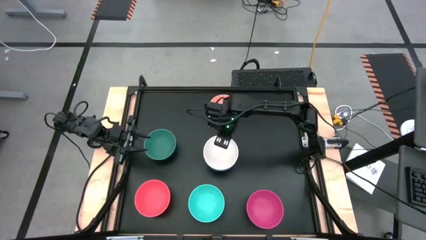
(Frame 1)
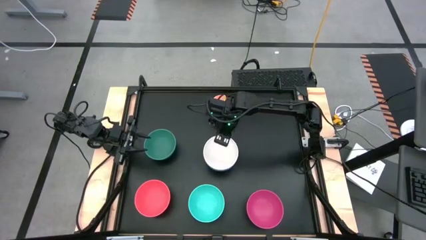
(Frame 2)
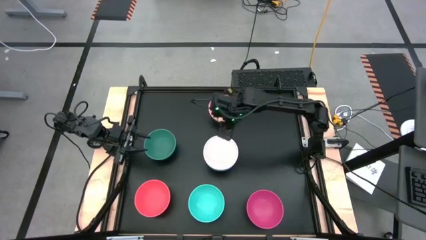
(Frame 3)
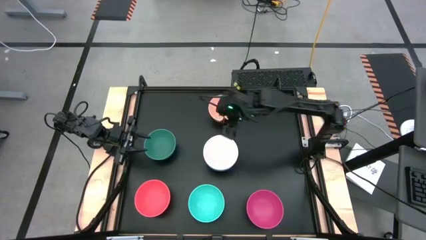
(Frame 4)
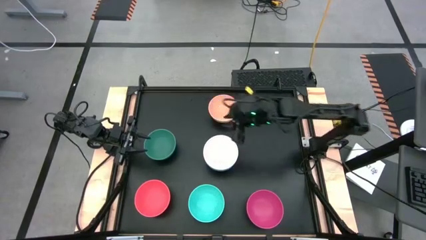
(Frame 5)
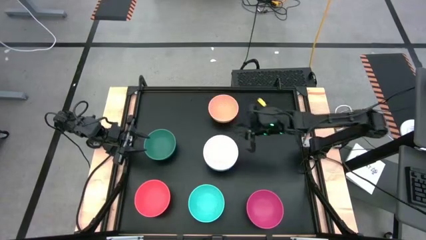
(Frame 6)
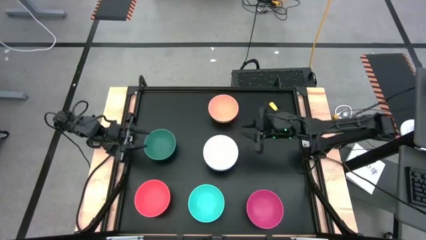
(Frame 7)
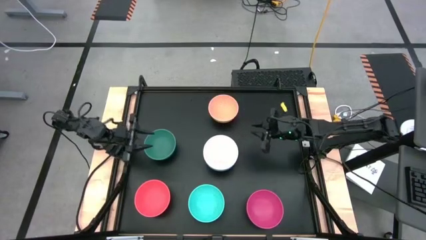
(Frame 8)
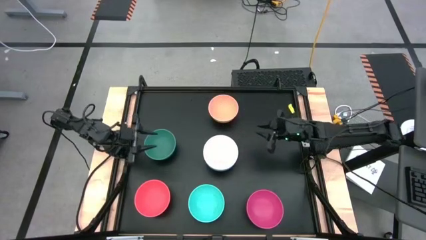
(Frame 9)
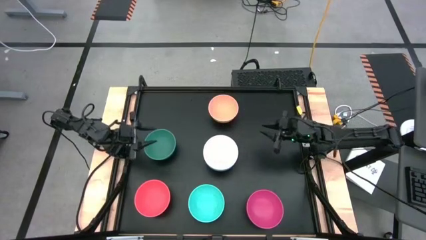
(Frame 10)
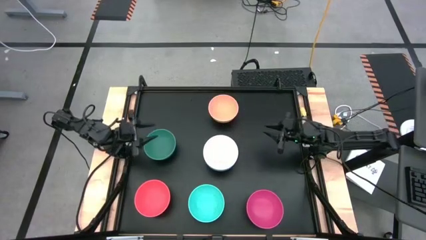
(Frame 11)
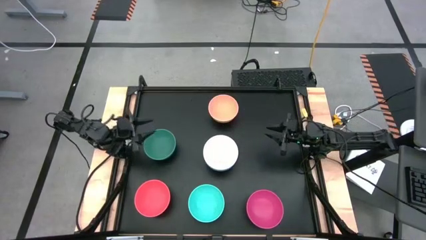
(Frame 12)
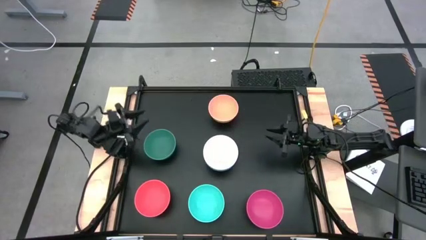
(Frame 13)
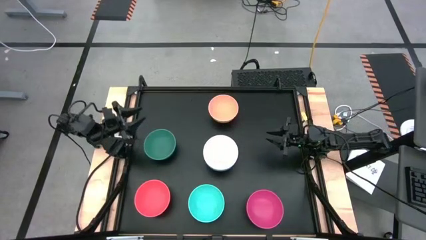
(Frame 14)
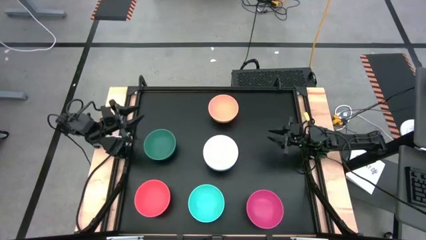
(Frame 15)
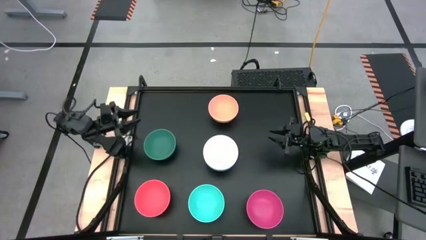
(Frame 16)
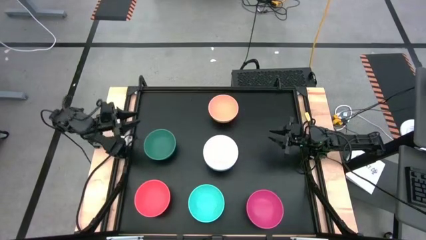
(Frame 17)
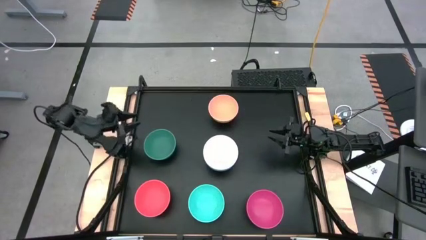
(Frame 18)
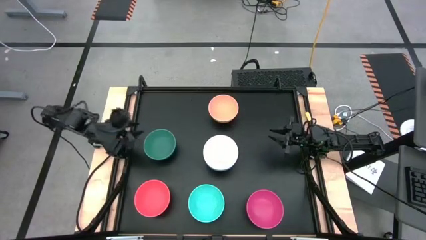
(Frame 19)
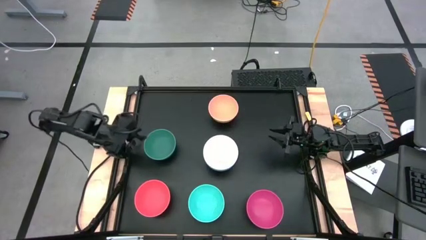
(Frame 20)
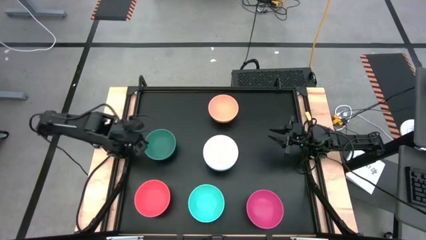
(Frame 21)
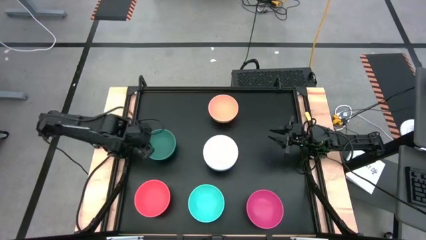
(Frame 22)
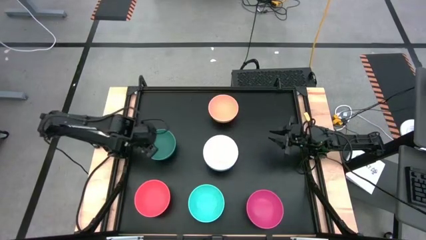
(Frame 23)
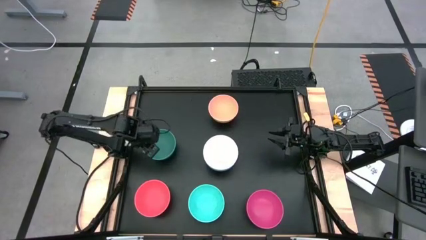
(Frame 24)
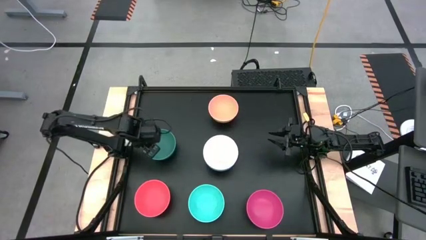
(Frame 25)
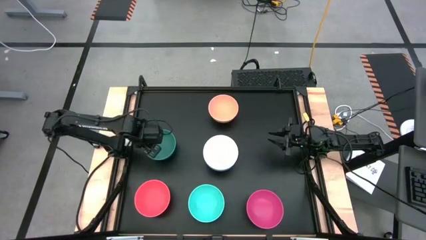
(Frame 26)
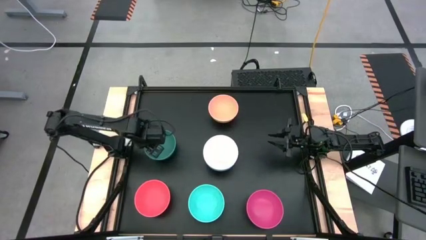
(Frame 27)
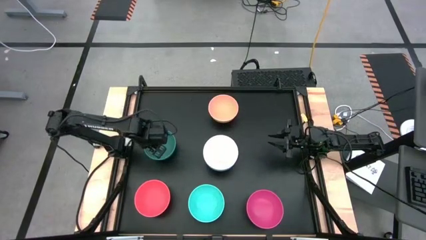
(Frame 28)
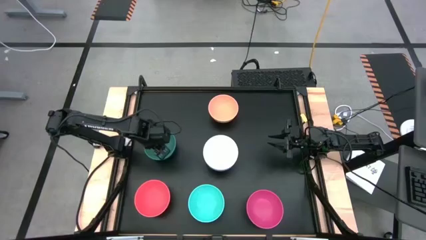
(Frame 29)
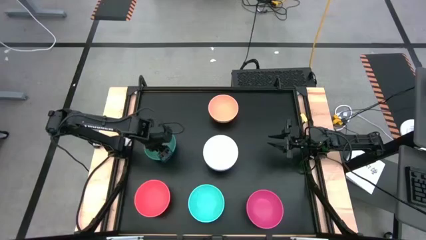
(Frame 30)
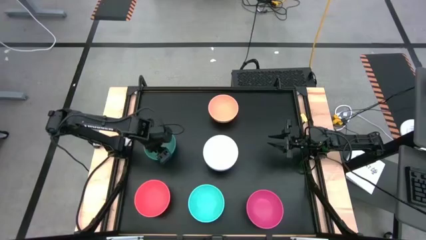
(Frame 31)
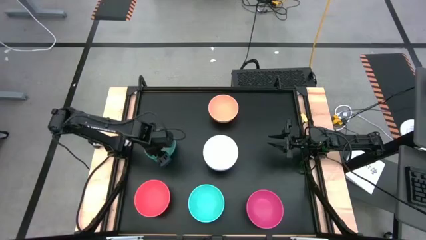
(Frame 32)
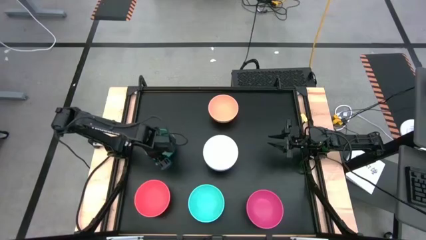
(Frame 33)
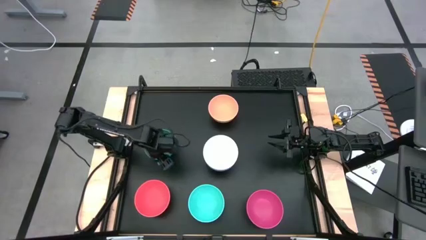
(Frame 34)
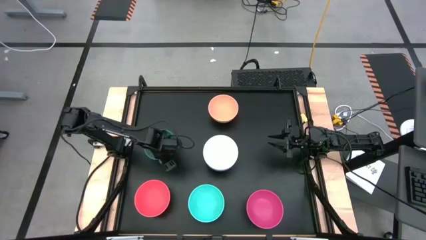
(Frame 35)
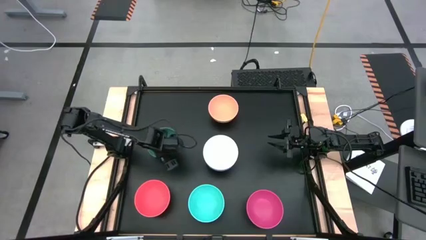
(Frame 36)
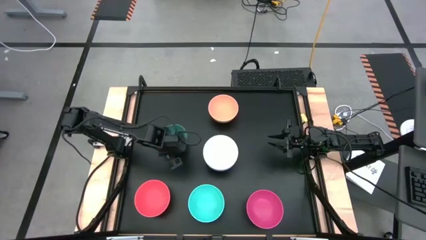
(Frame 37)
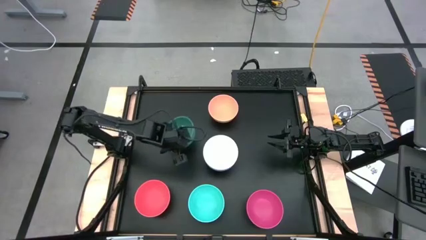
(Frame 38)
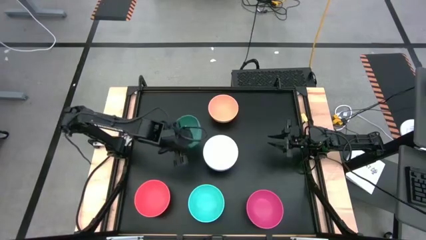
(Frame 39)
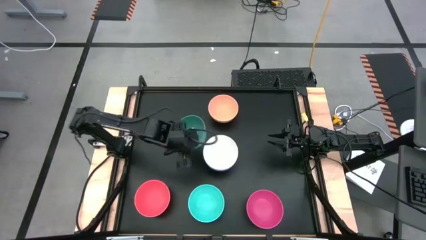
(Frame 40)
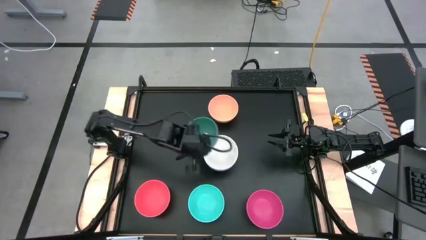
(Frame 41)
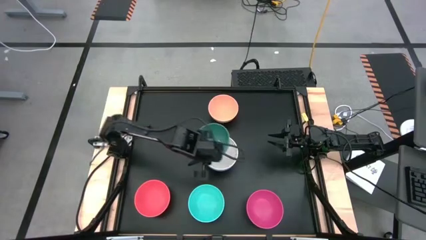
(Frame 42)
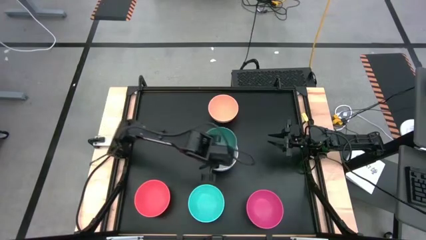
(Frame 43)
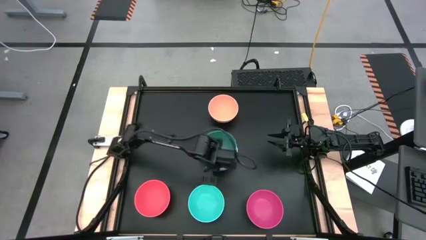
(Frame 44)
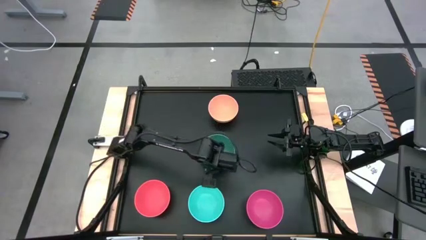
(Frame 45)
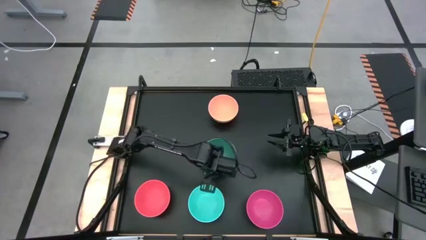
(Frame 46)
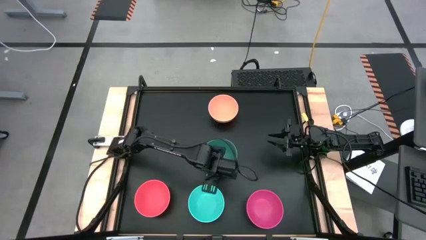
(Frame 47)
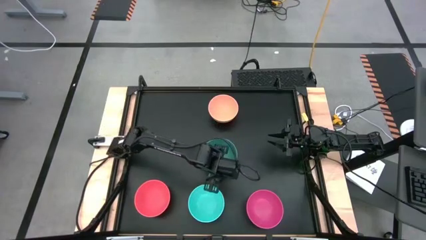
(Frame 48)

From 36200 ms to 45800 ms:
Task: Nest bowls inside each other
Stack the green bowl on the white bowl

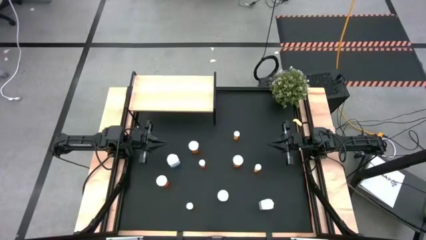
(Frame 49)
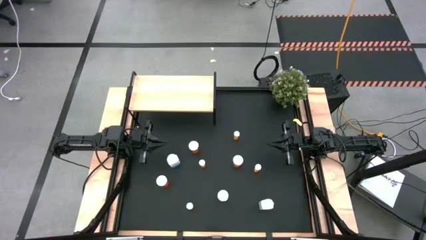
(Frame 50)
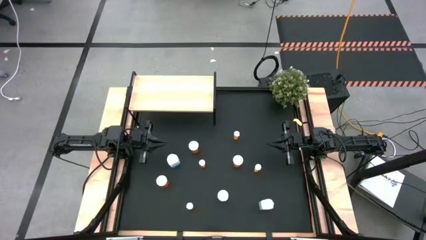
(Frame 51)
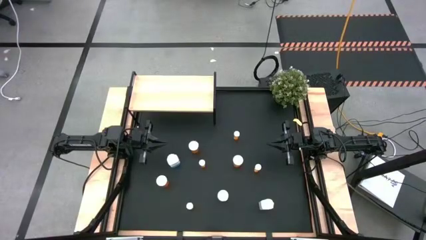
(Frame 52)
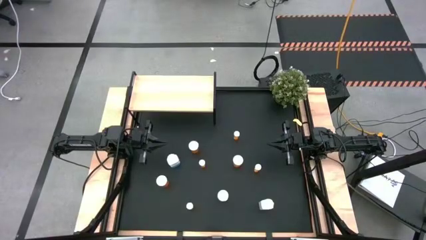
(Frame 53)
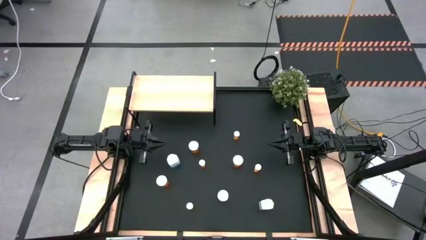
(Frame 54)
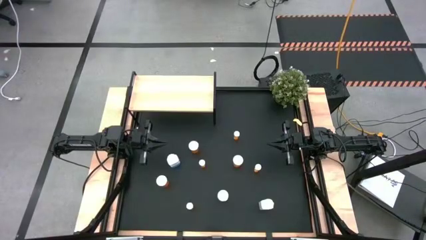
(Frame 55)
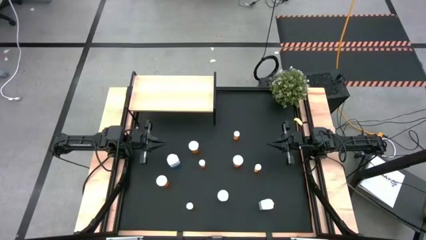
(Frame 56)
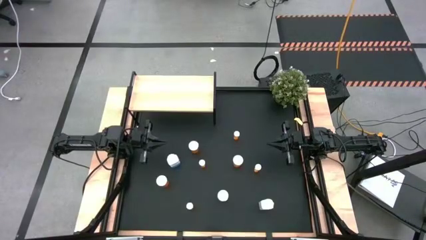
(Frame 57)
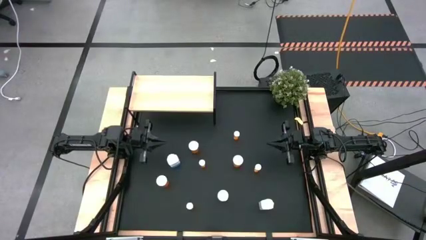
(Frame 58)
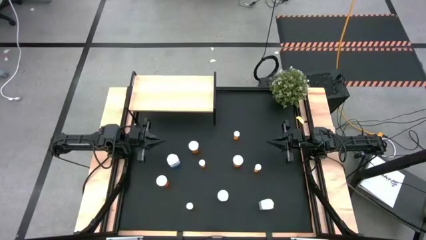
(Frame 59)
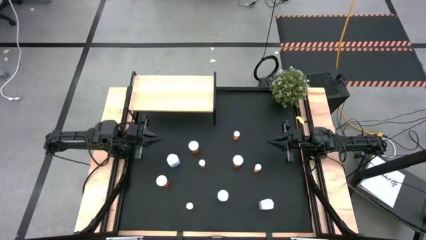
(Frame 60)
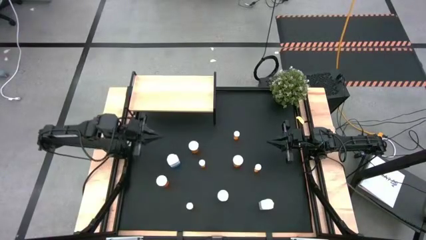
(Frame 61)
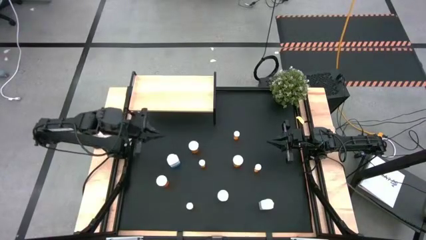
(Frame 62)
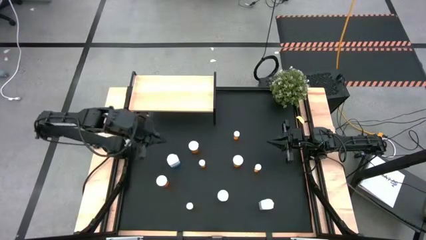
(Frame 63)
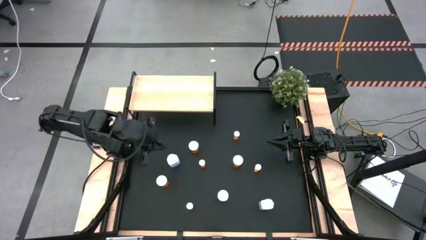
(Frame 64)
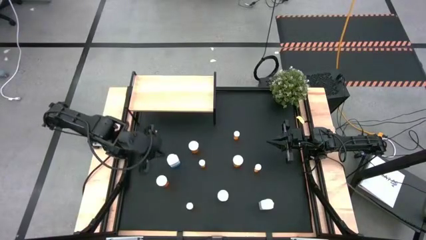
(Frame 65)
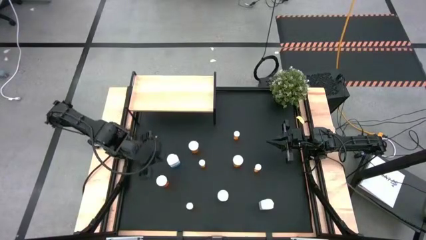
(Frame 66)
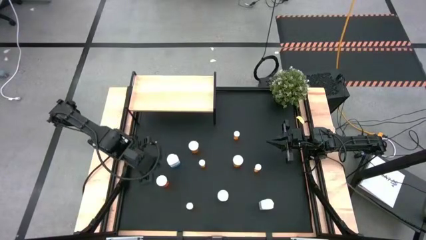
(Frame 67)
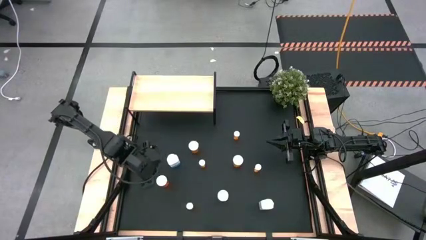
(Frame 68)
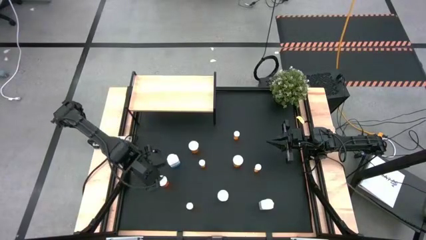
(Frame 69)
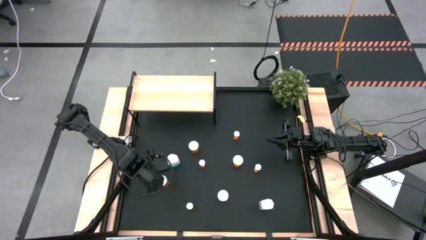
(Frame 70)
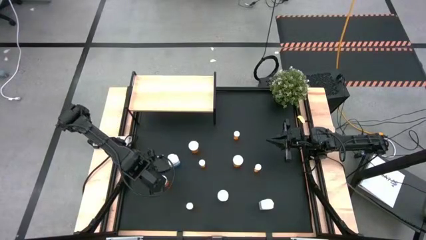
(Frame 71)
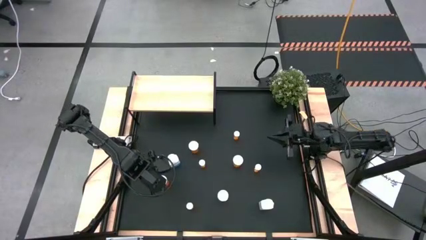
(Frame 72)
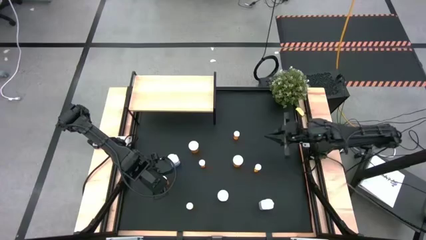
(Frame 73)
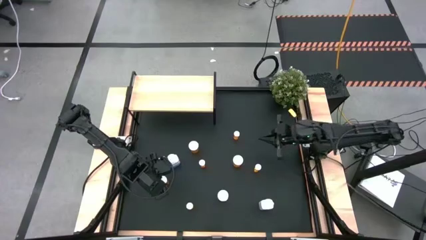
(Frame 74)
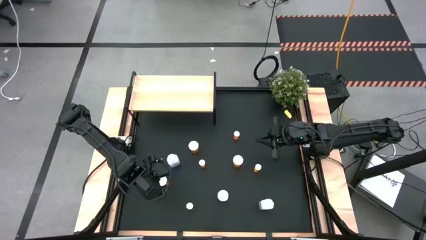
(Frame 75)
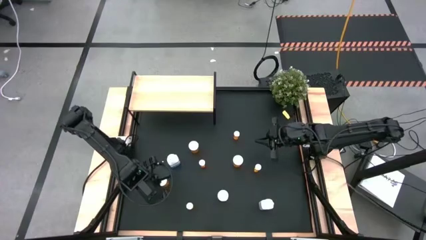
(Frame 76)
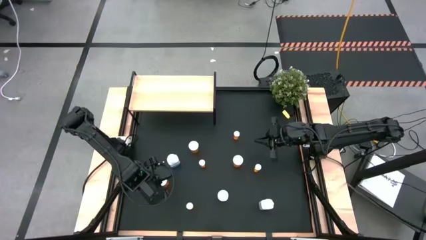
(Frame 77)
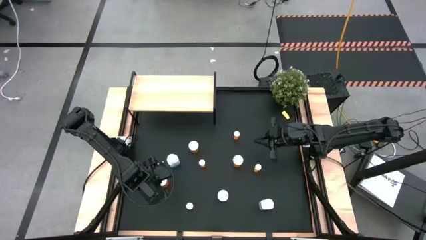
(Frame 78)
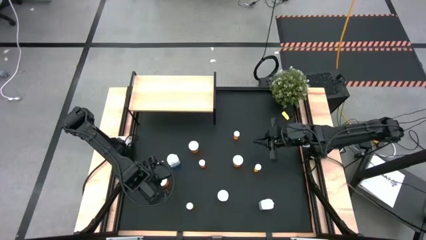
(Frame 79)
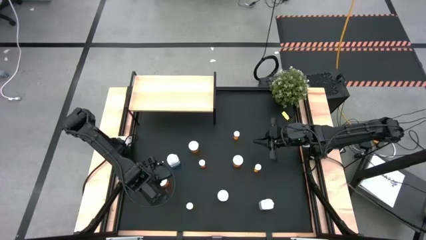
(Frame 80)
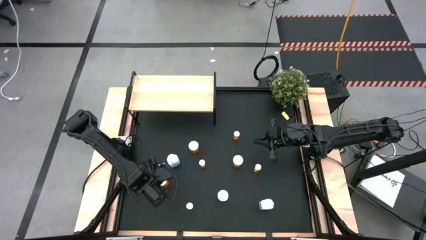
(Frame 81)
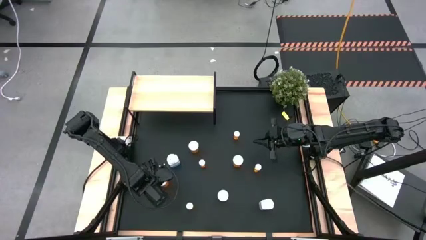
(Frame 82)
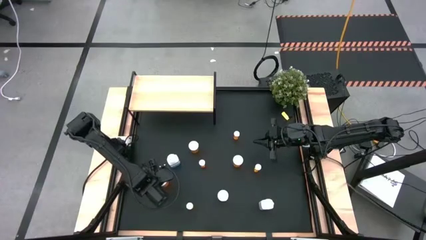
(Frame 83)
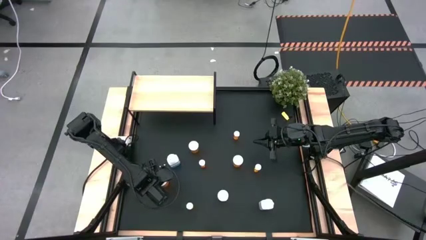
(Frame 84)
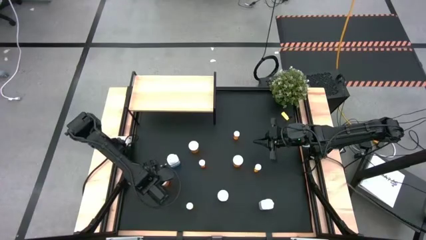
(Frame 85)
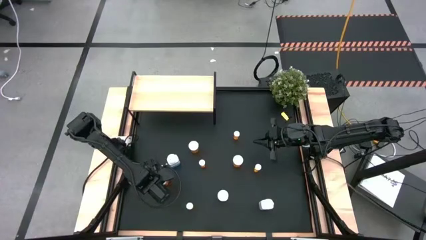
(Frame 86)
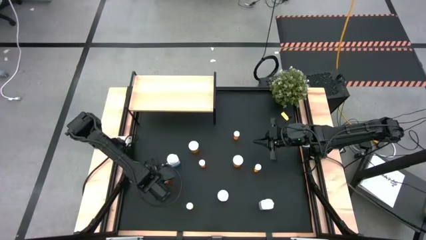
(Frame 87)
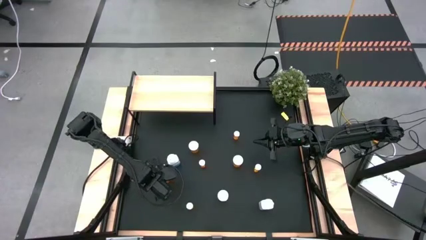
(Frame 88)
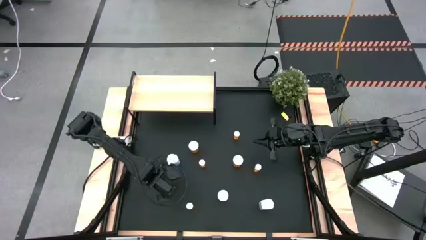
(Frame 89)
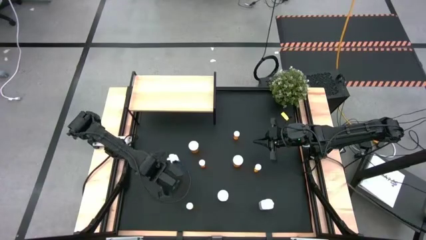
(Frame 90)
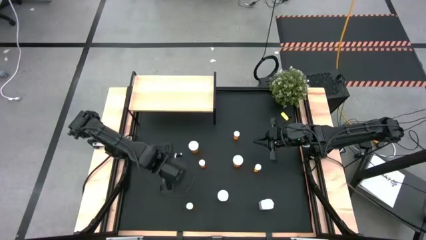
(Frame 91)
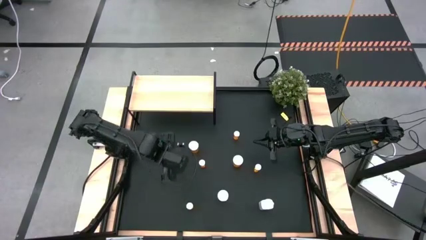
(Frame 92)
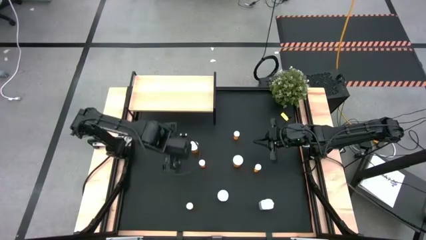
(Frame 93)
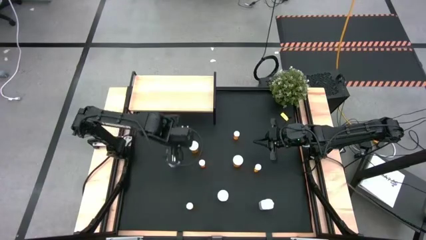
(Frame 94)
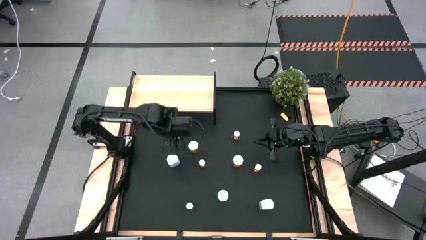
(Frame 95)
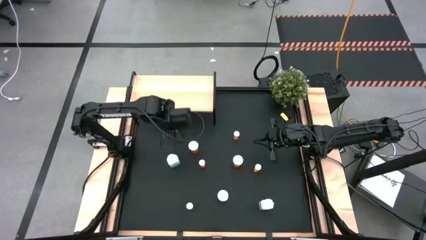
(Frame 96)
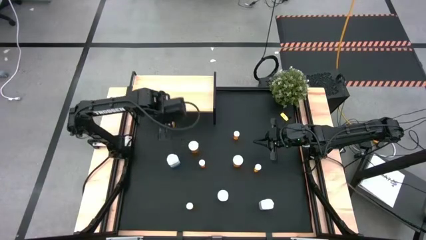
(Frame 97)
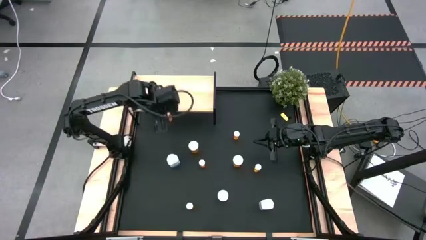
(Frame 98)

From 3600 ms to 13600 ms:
Task: Pick and place medicine bottles onto shelf by color
Put the large orange pill bottle on the shelf
